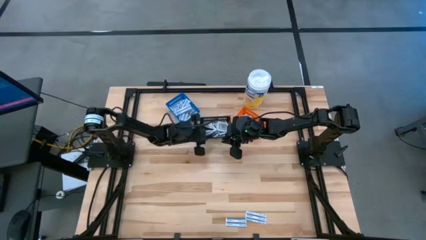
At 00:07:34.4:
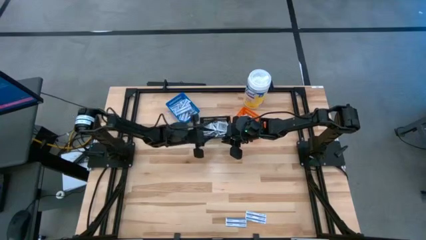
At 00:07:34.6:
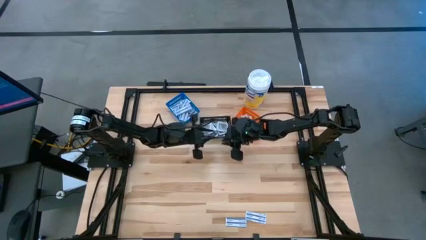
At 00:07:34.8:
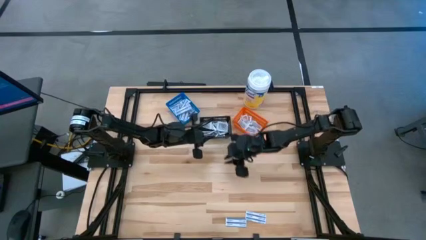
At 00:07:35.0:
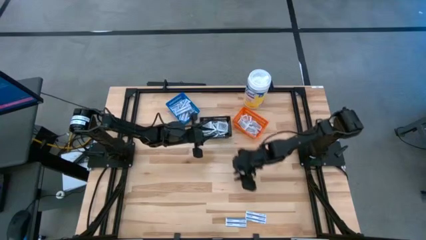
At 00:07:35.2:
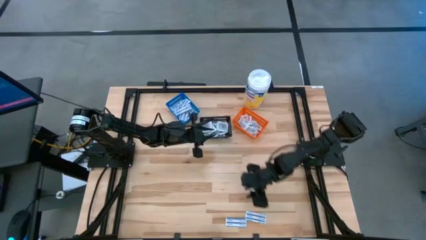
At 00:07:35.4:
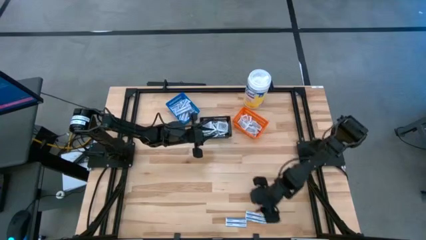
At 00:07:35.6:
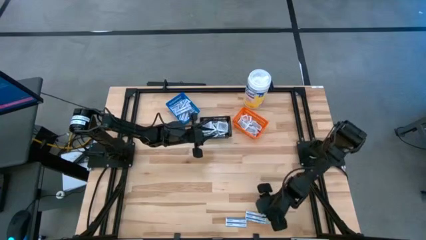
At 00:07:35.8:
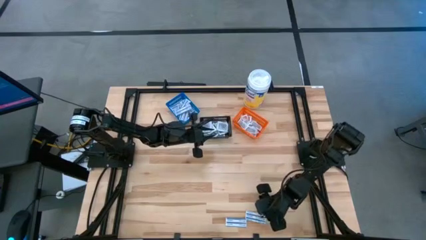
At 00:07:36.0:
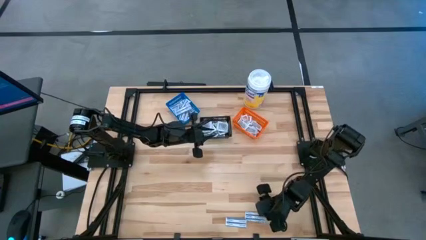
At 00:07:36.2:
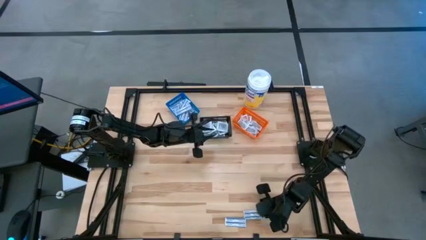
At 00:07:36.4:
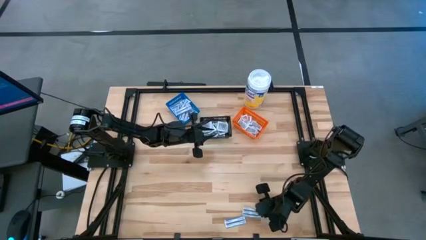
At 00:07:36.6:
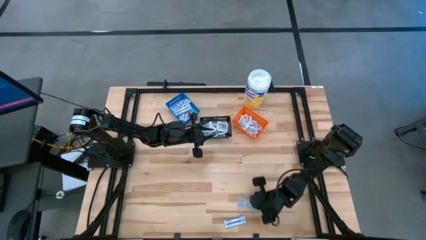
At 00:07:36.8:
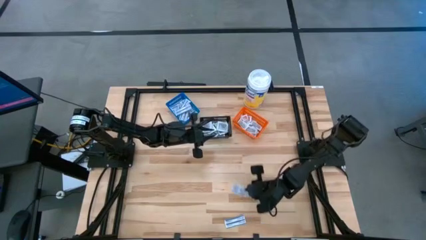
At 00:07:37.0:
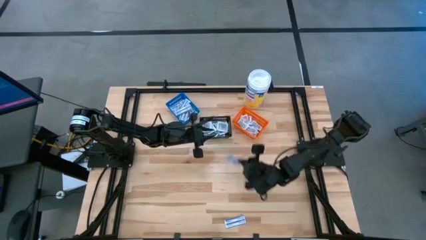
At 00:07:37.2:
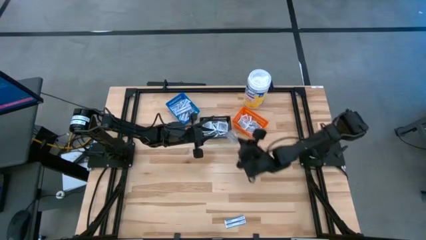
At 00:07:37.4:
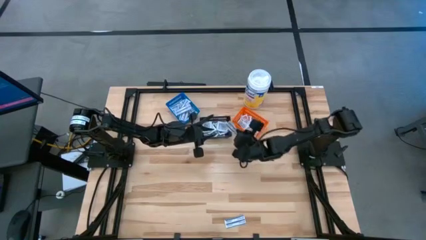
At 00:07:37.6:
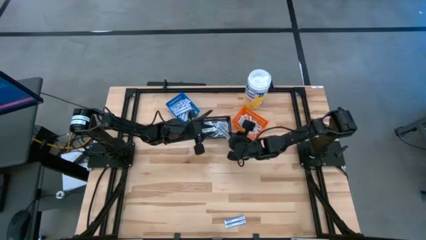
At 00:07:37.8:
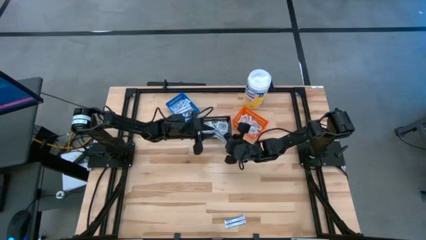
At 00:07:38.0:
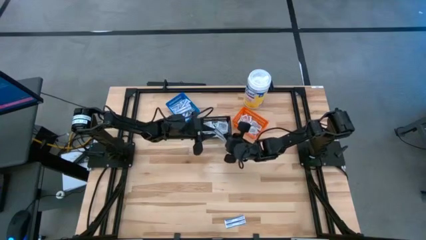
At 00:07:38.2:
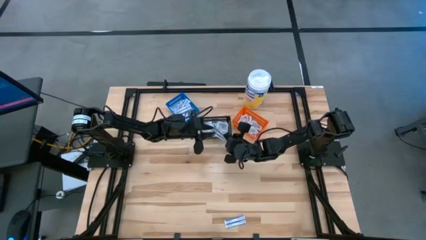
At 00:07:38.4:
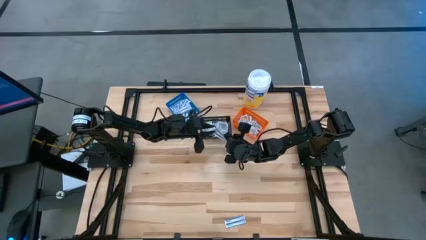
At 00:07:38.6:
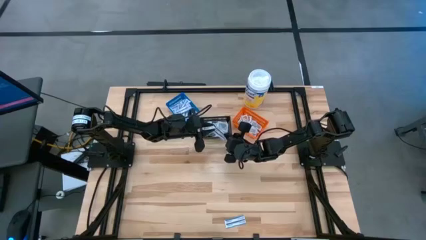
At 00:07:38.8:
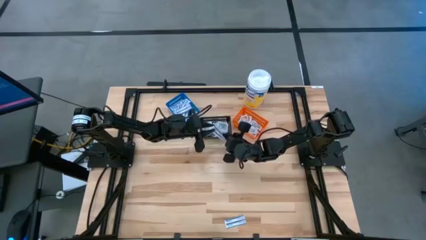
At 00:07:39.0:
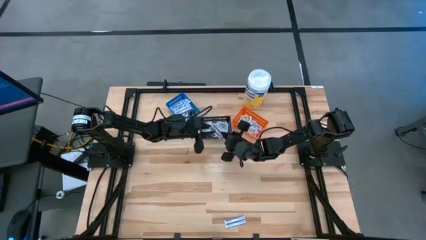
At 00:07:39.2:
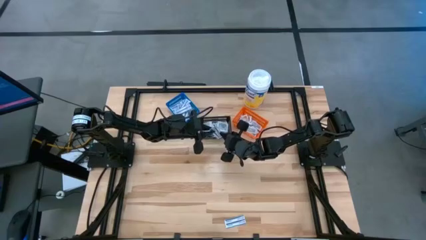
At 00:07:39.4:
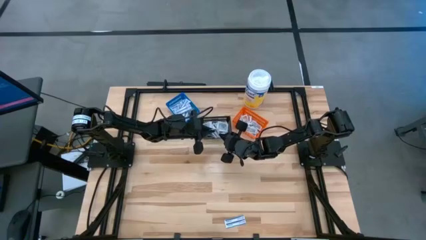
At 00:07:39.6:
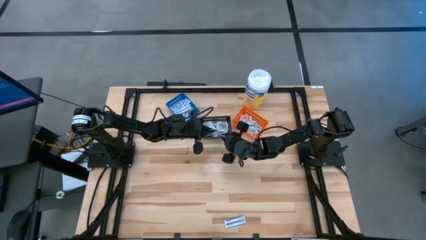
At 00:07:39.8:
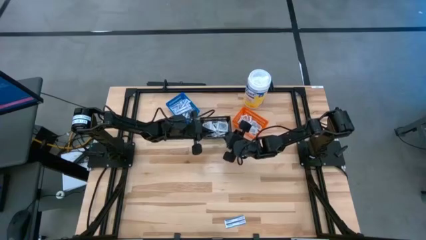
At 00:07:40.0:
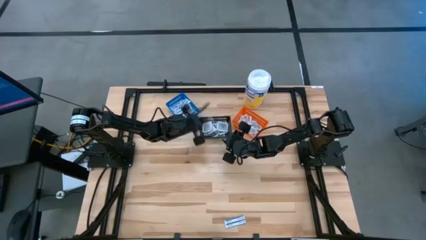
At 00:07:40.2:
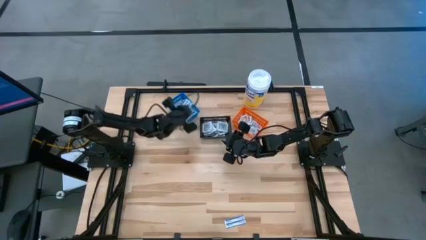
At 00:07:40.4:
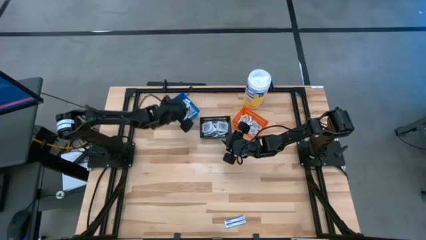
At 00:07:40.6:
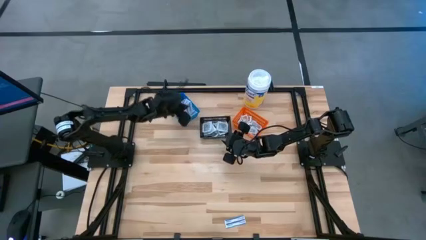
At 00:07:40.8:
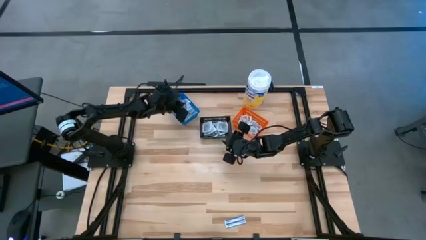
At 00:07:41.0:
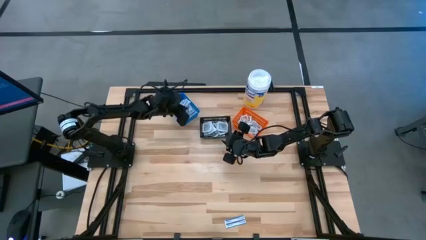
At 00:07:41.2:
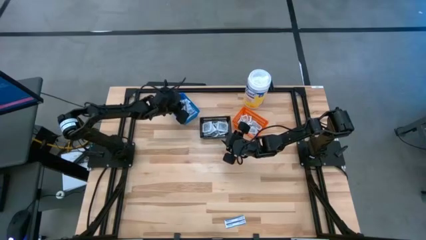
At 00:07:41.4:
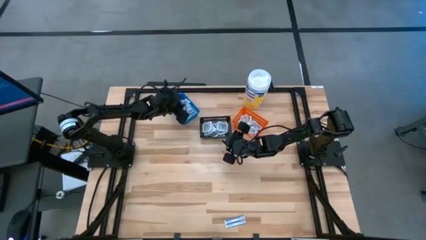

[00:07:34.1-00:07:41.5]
Task: Pick & Place First Aid Supplies
Put the bandage into the blue container

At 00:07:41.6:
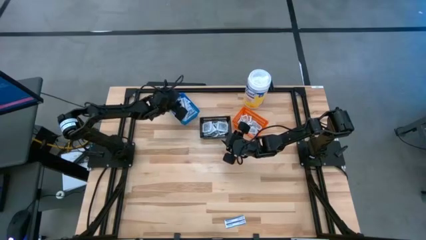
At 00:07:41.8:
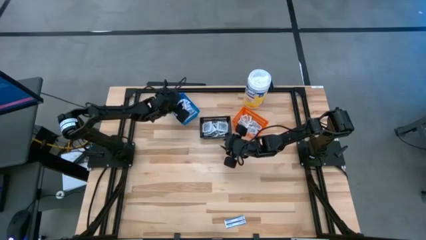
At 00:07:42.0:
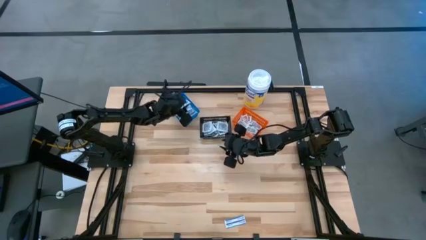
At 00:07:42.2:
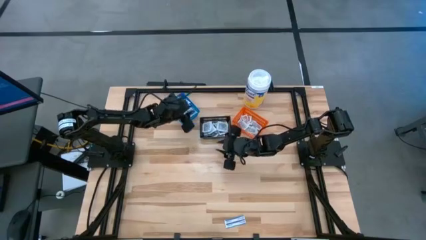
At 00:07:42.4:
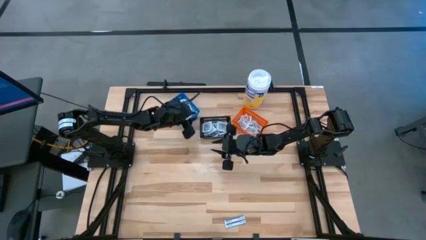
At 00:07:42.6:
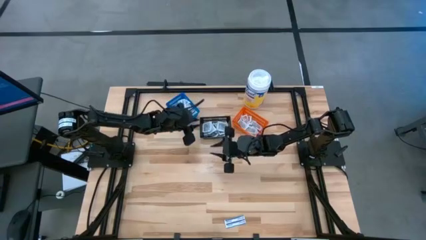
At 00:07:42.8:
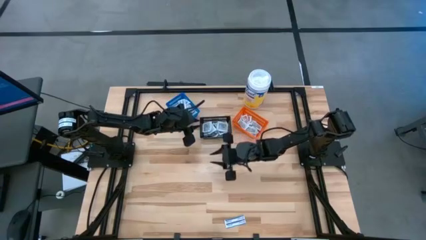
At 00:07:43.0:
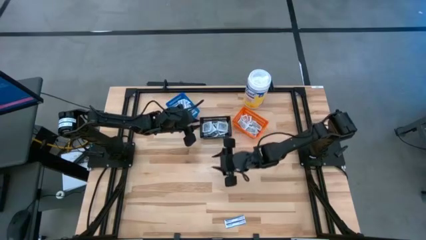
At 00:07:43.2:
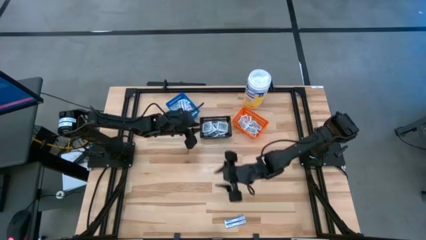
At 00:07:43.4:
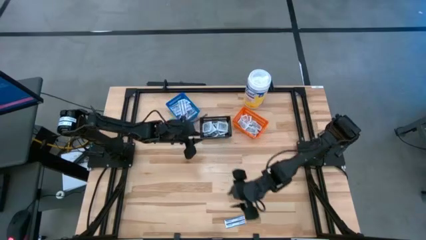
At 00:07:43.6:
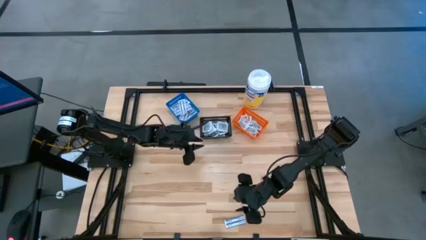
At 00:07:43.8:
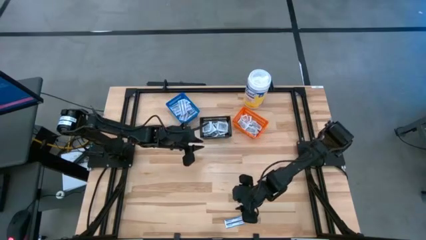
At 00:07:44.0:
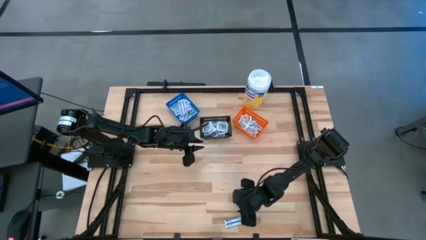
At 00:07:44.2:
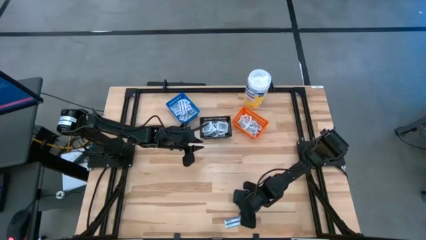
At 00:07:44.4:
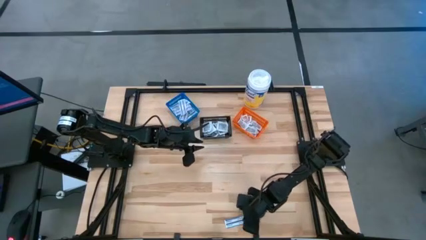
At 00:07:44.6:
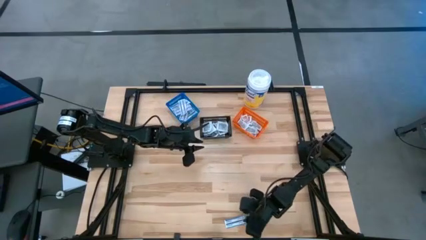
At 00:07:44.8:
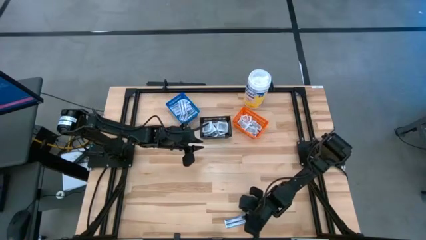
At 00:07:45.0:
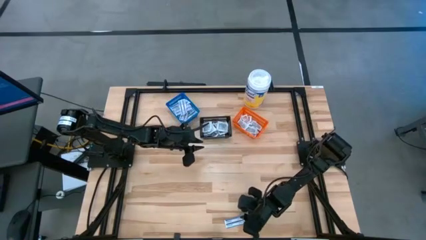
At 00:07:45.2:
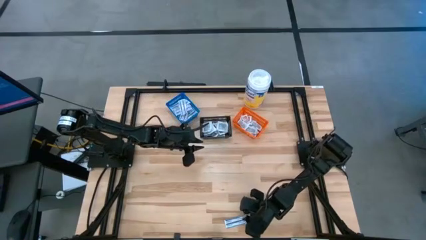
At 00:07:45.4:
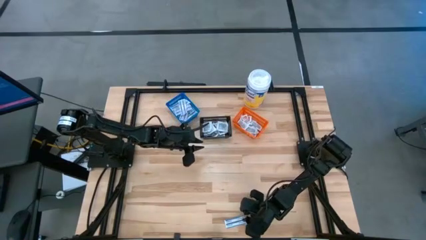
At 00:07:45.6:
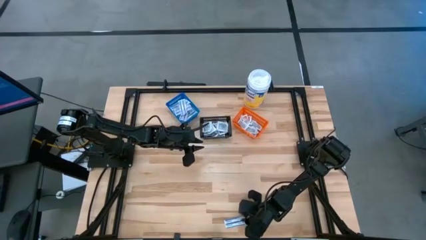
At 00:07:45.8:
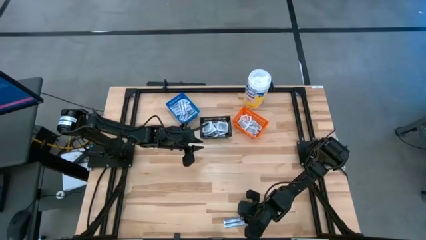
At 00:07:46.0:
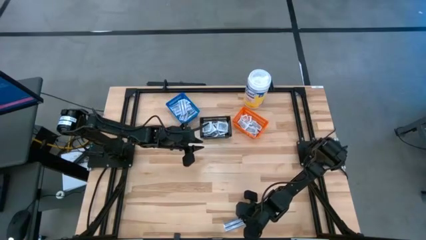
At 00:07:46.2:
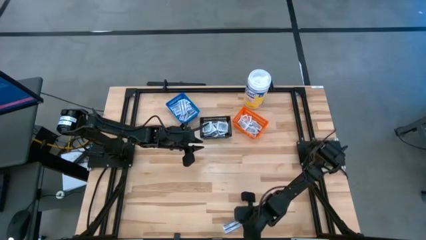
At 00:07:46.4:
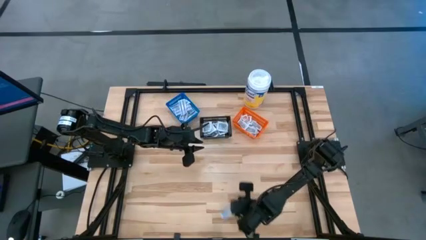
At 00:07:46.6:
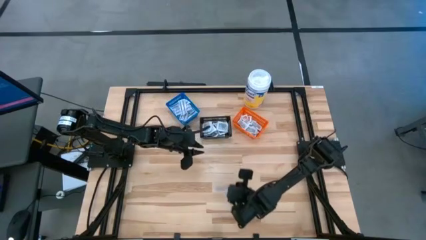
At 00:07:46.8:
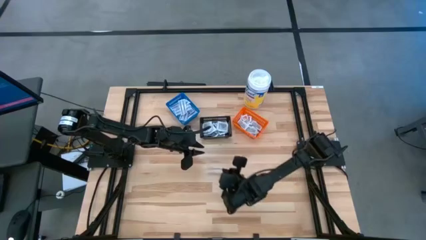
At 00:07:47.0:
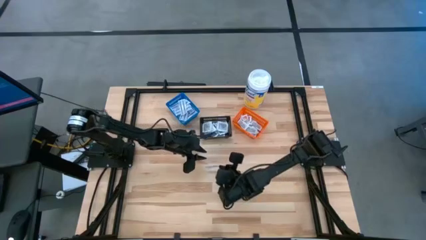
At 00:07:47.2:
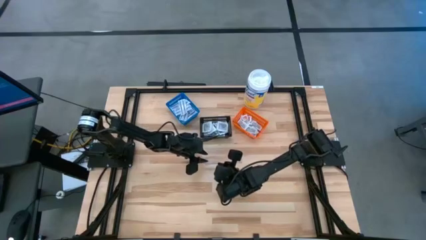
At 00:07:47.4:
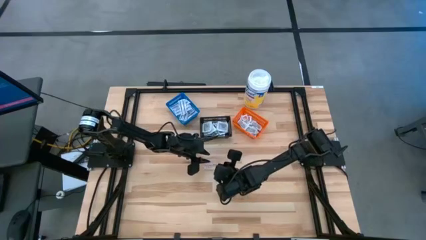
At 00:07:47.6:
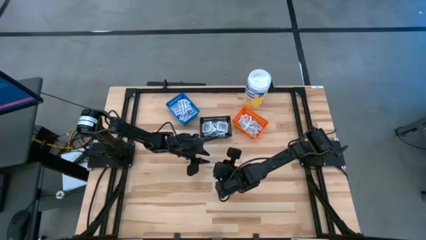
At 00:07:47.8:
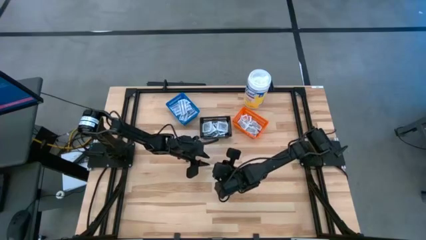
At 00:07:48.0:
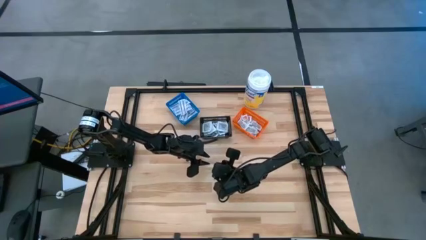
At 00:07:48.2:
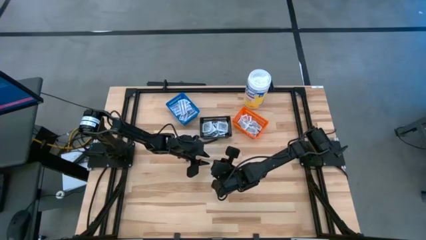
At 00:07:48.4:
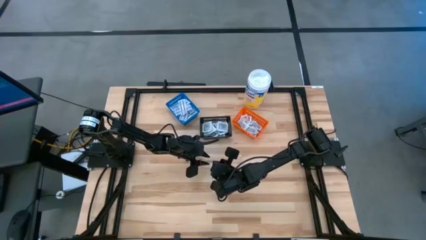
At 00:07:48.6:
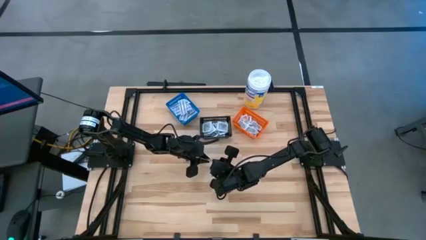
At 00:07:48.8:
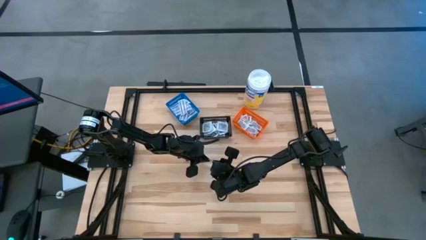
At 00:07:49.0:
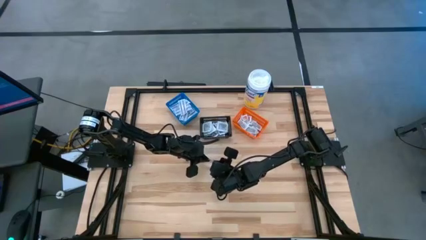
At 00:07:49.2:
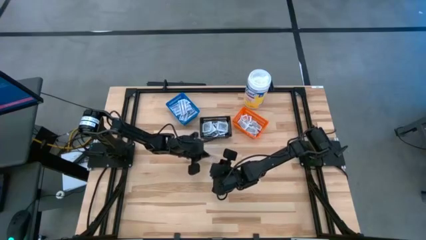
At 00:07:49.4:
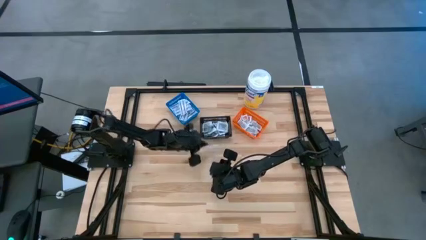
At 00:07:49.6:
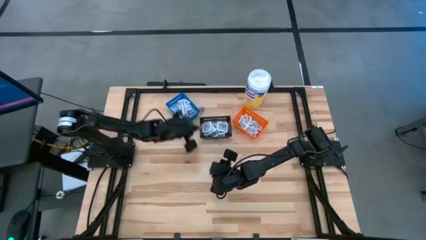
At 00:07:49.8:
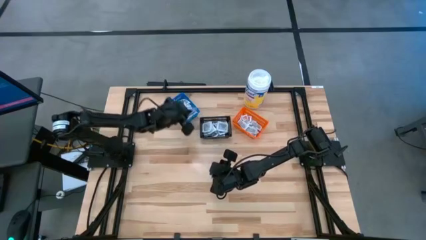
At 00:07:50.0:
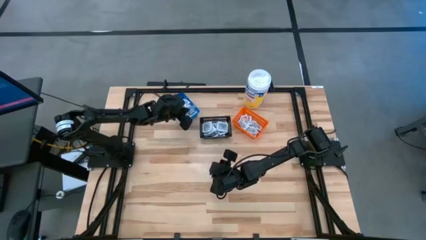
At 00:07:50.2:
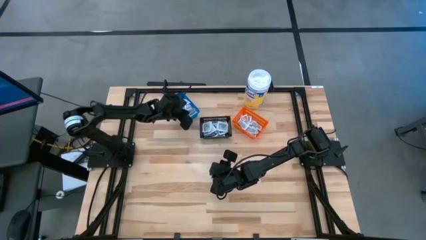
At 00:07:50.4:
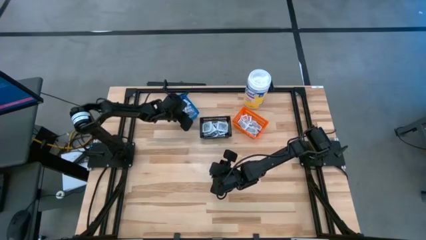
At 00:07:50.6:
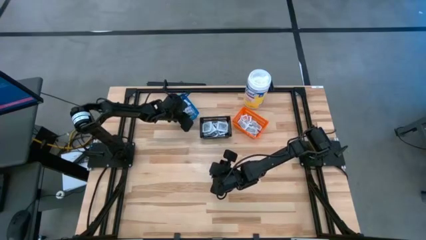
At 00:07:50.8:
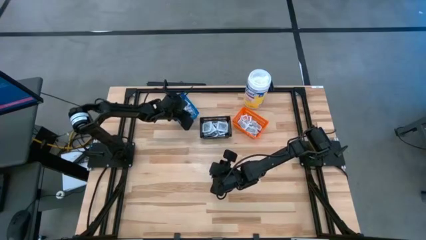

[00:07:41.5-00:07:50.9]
Put the bandage into the blue container
